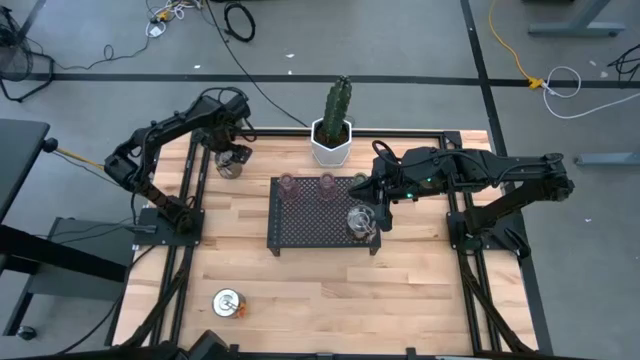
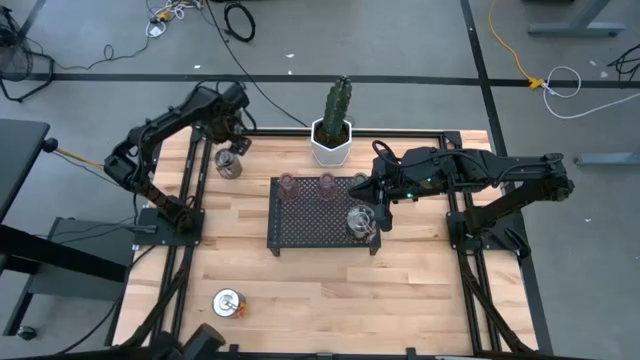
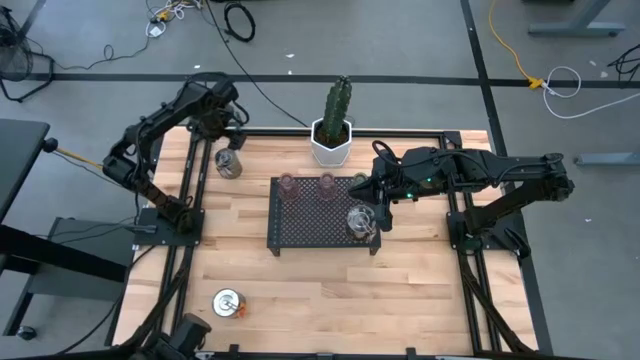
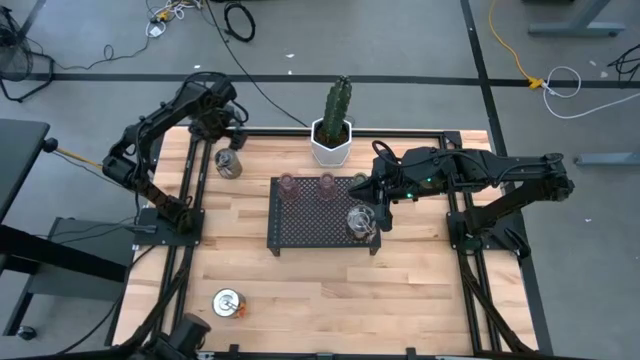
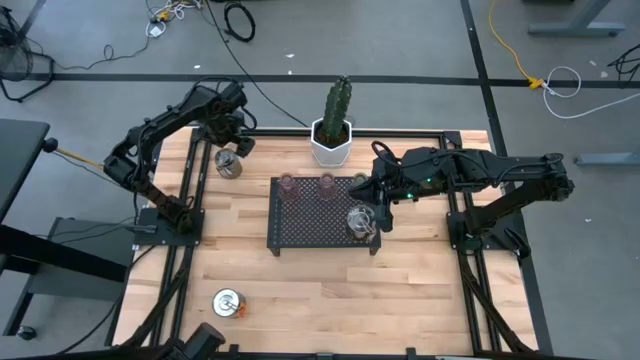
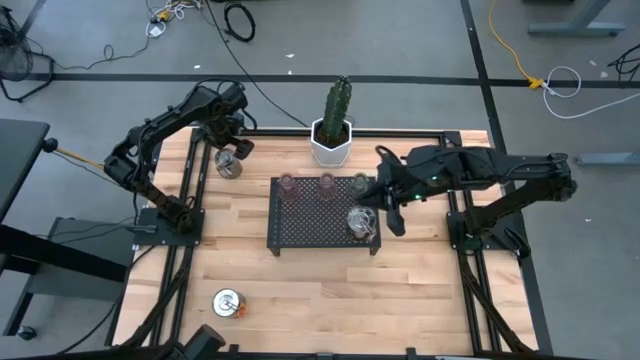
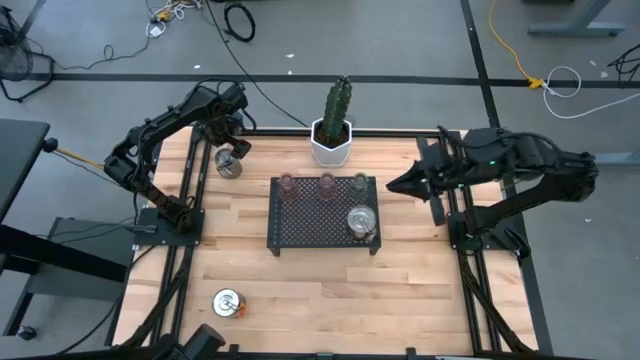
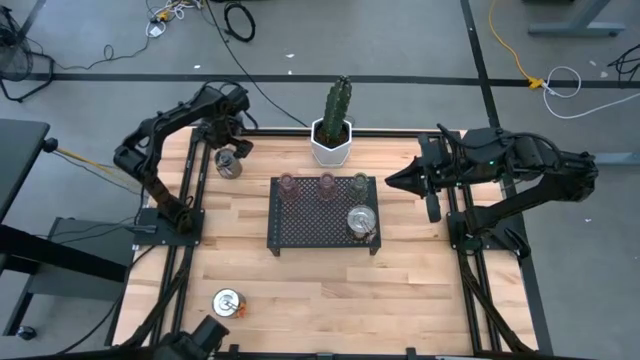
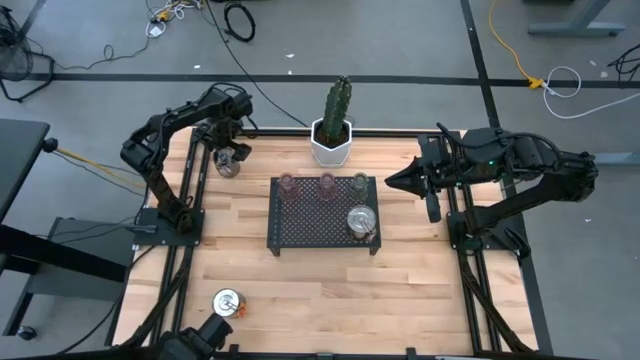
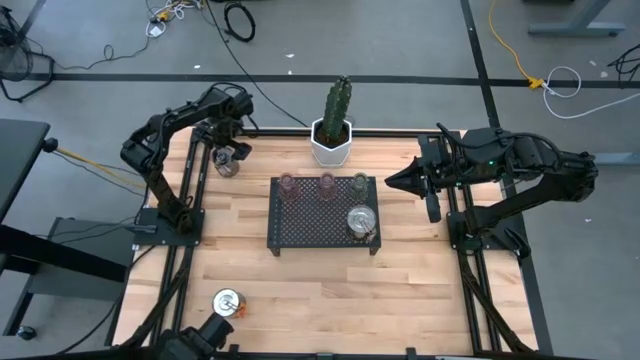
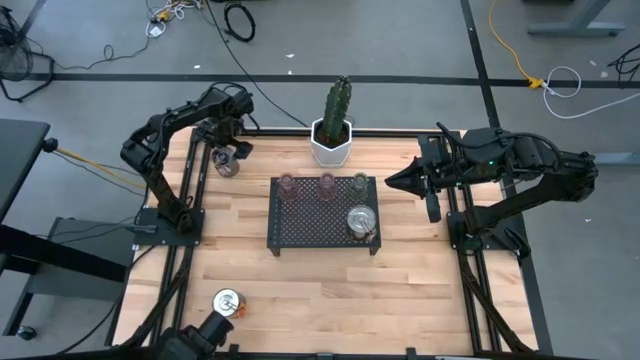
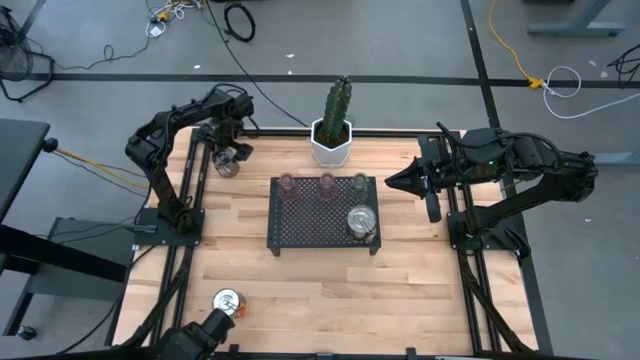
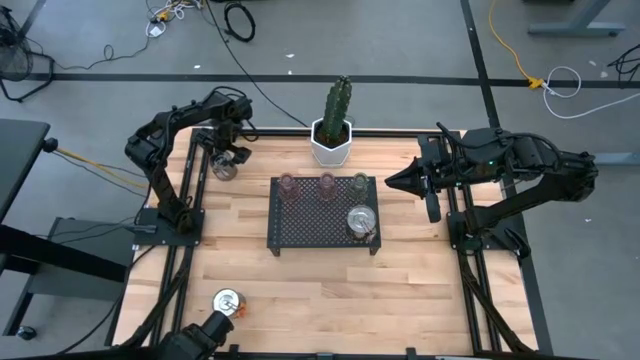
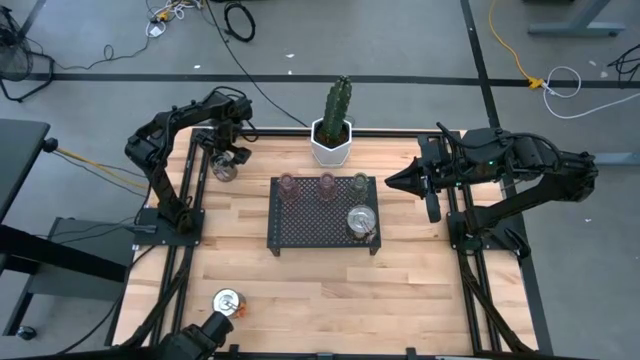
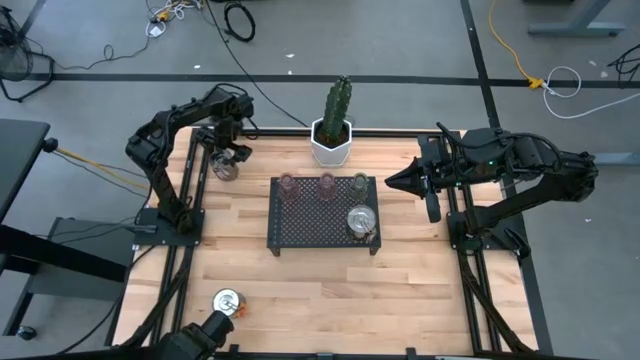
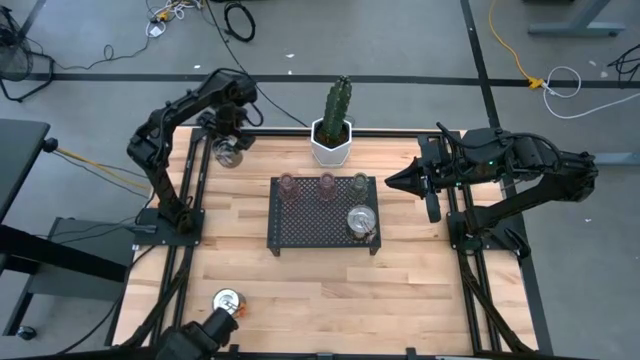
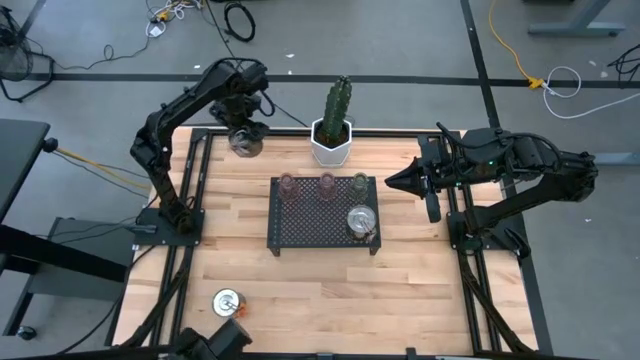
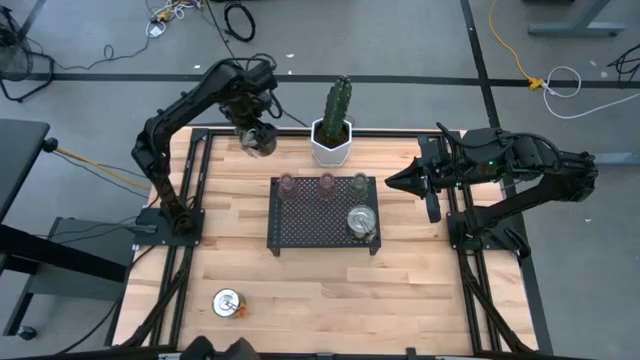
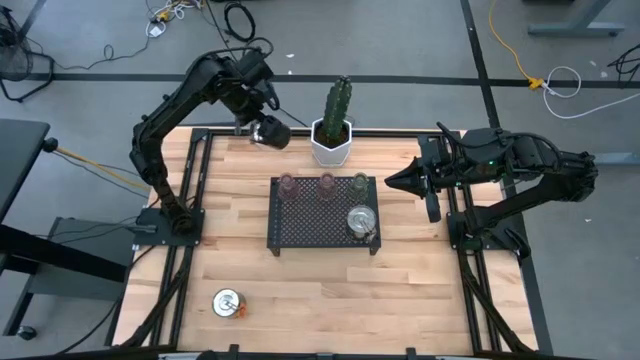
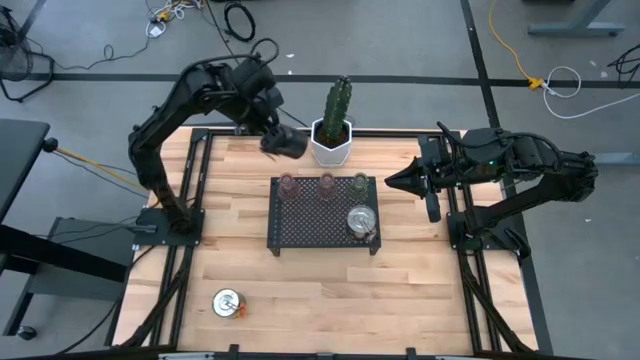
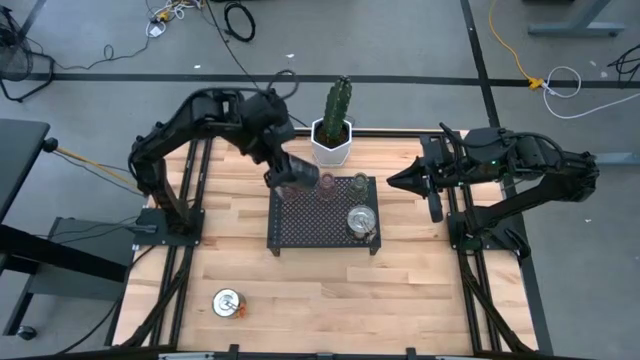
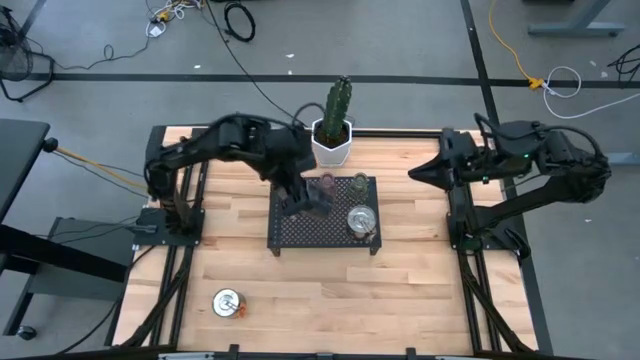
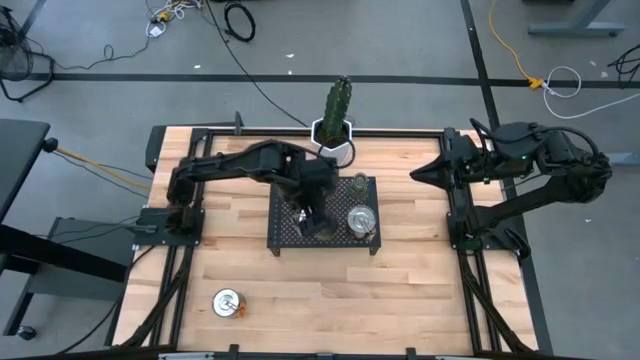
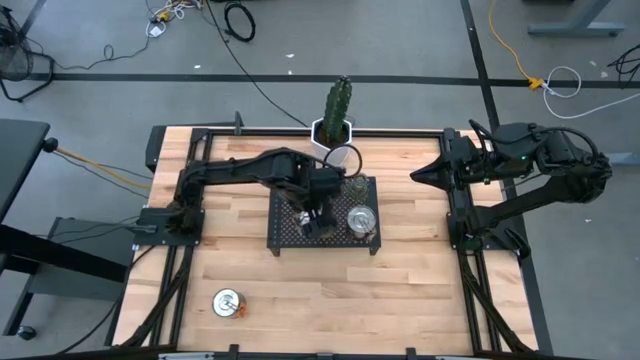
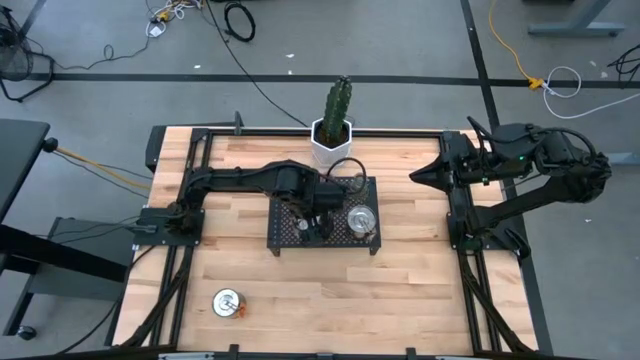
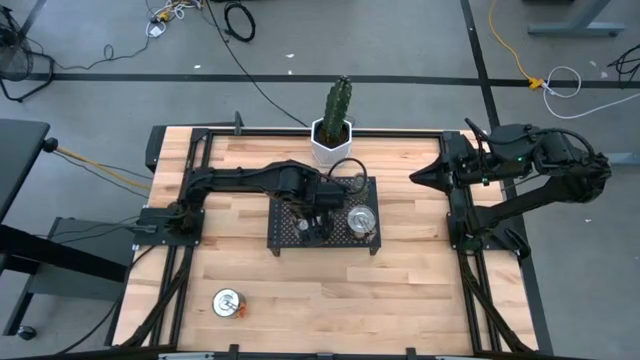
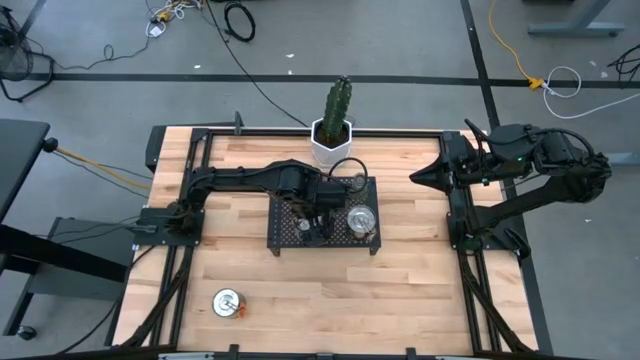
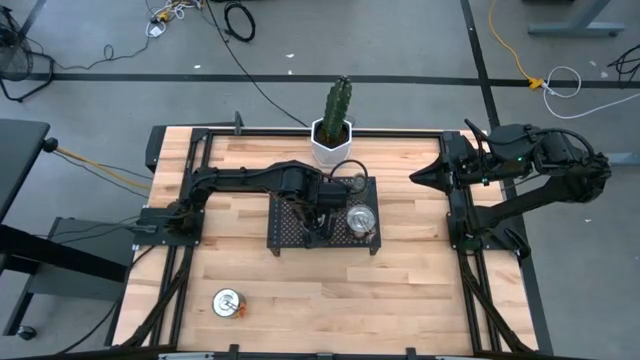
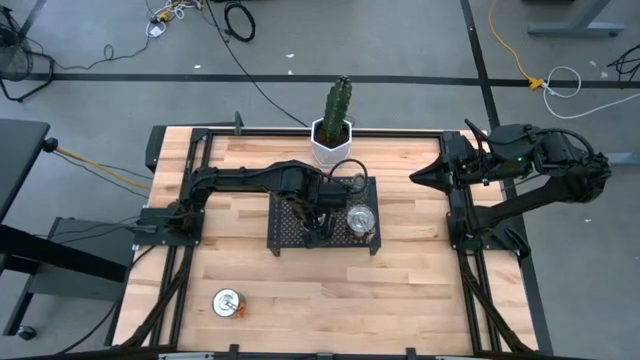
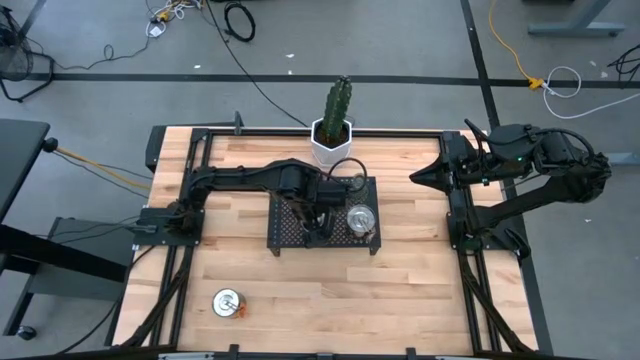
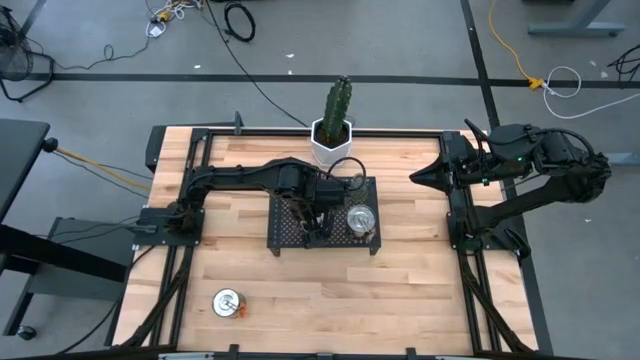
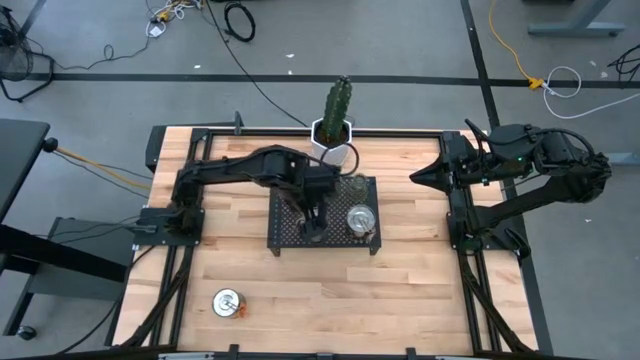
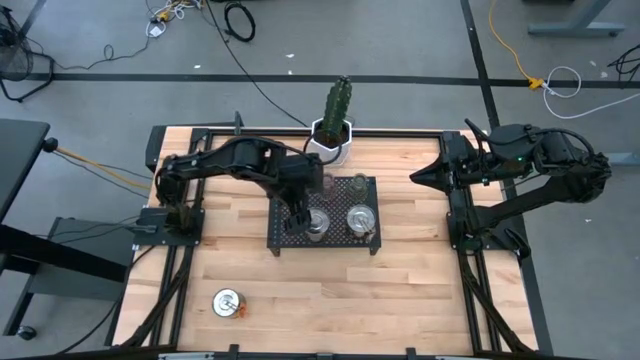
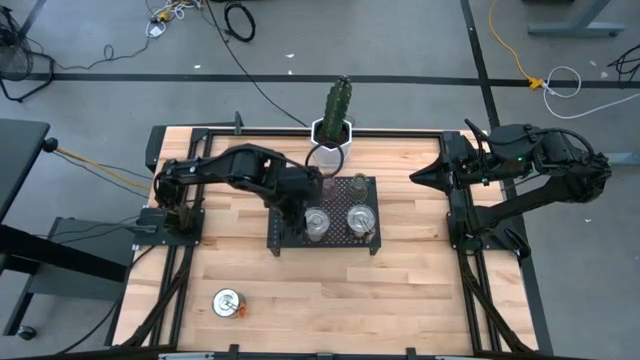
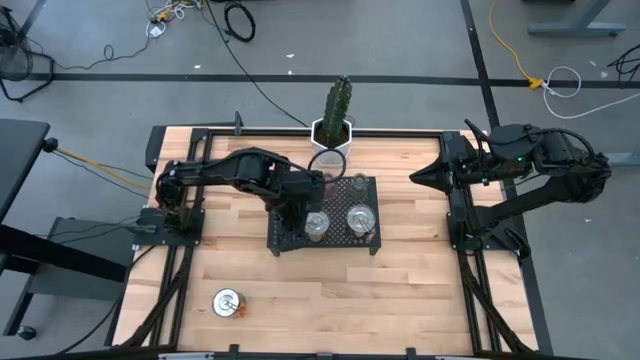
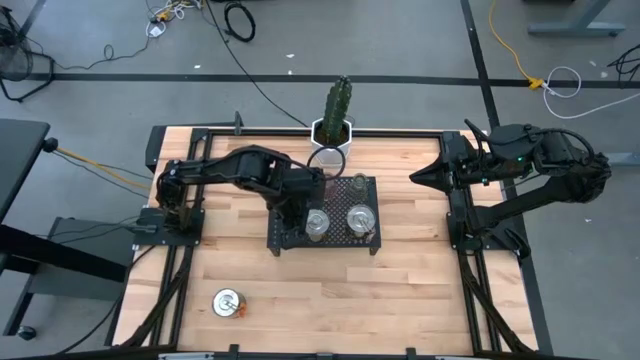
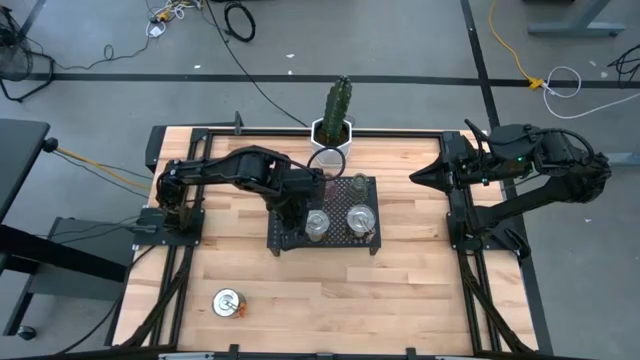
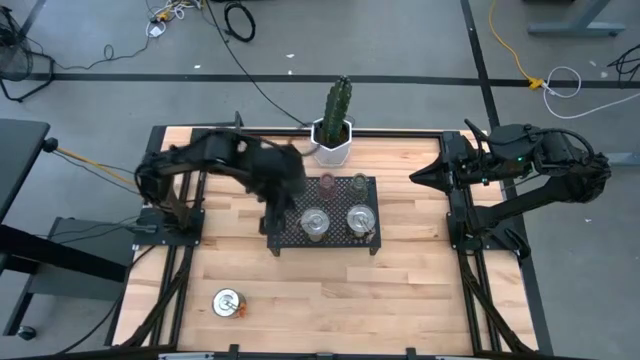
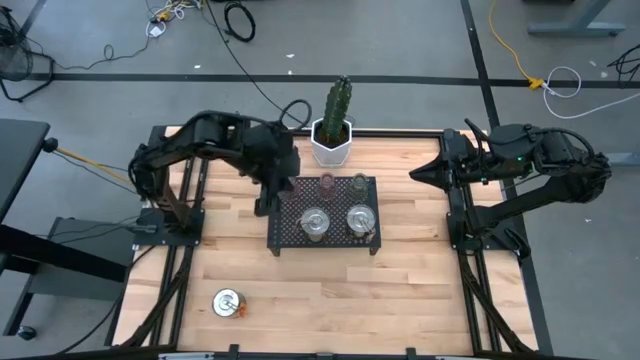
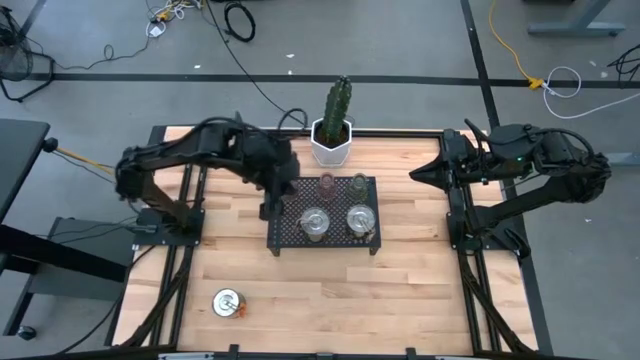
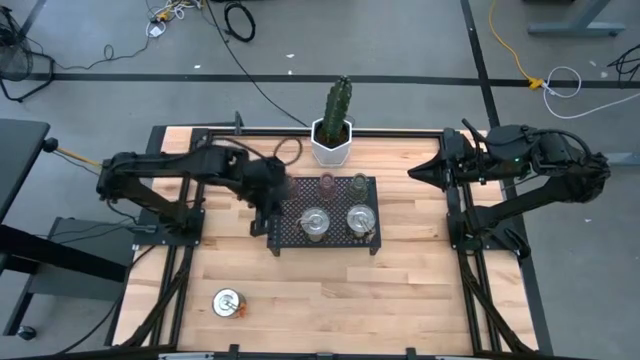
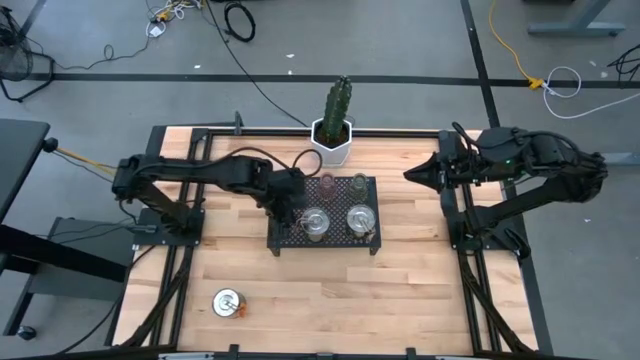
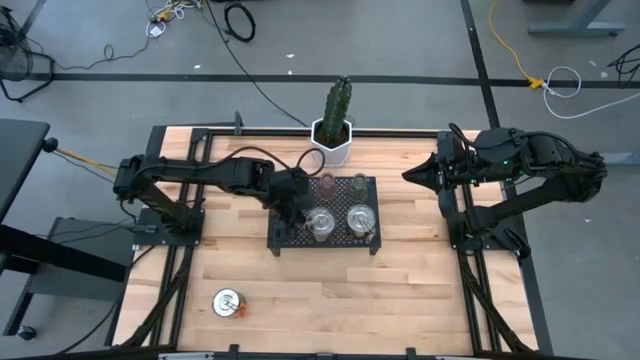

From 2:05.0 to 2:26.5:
Task: Pick & Place candle stick holders
Put the top silver scented candle on the shelf
